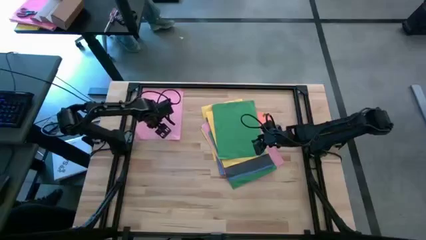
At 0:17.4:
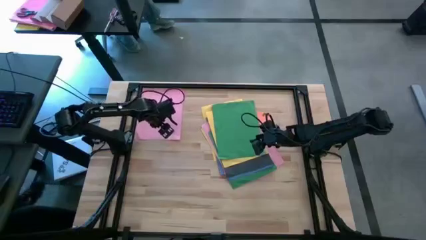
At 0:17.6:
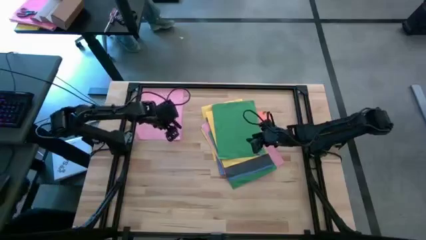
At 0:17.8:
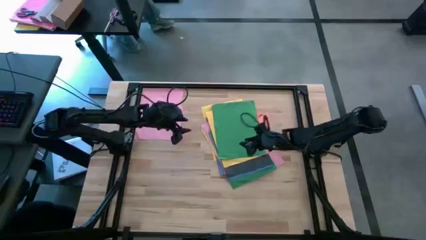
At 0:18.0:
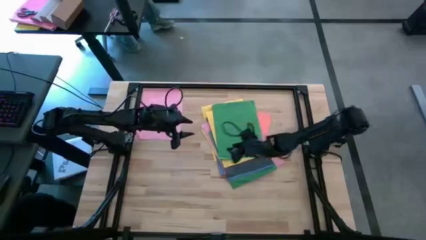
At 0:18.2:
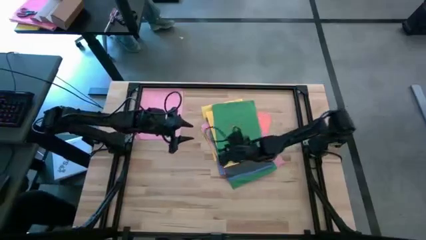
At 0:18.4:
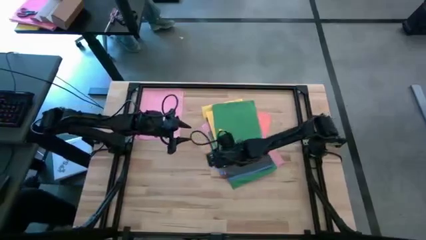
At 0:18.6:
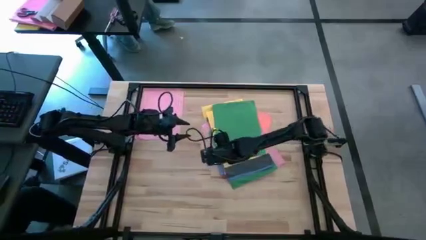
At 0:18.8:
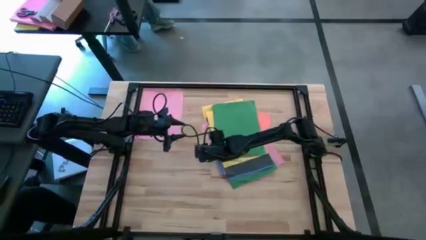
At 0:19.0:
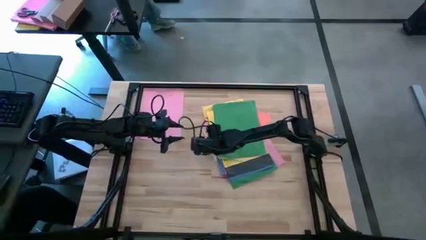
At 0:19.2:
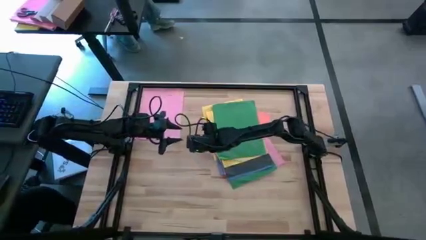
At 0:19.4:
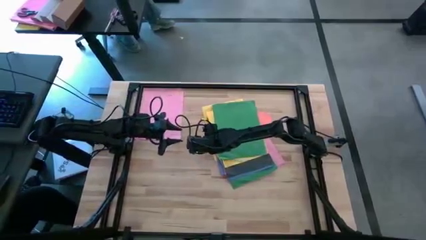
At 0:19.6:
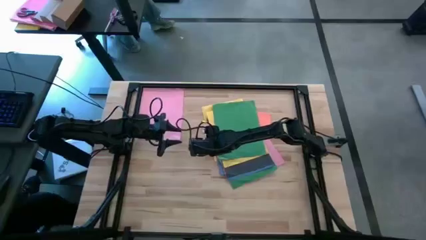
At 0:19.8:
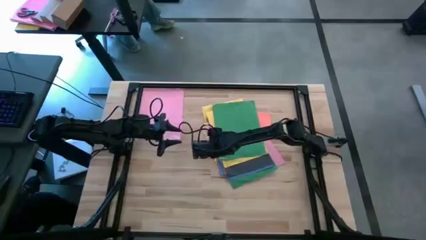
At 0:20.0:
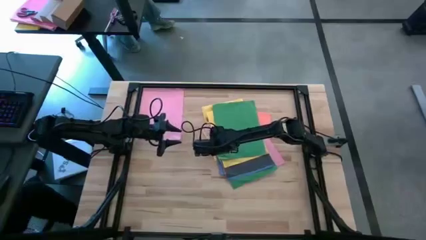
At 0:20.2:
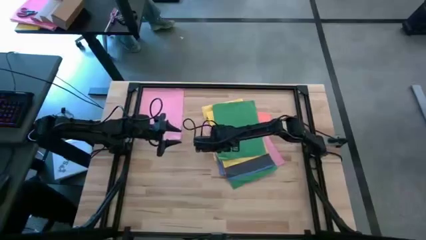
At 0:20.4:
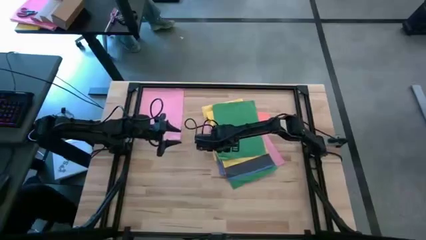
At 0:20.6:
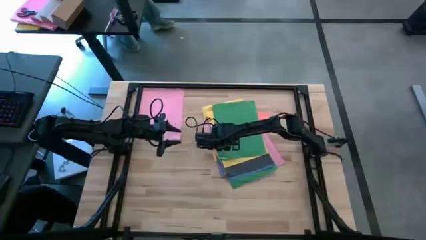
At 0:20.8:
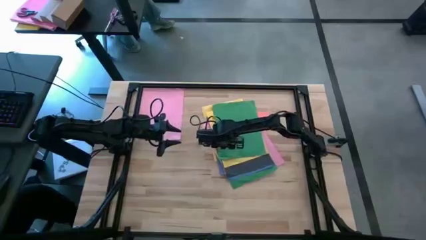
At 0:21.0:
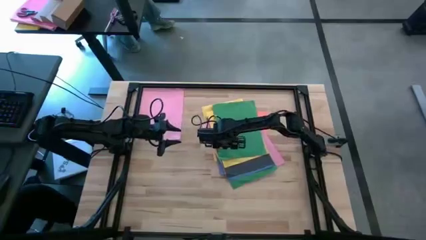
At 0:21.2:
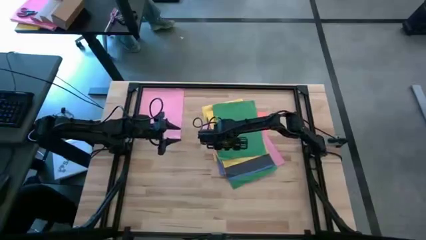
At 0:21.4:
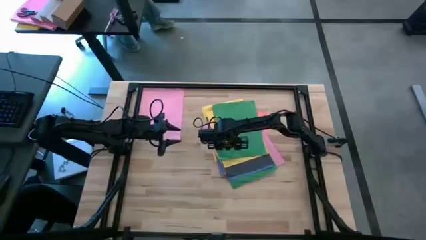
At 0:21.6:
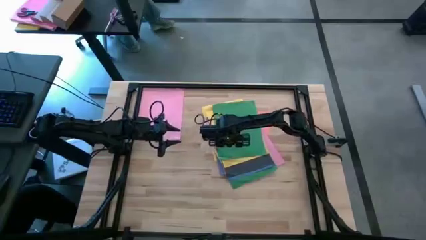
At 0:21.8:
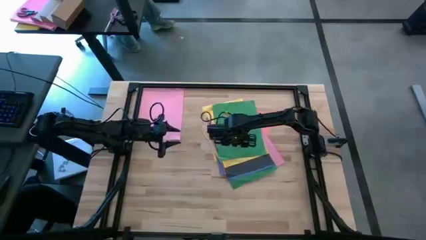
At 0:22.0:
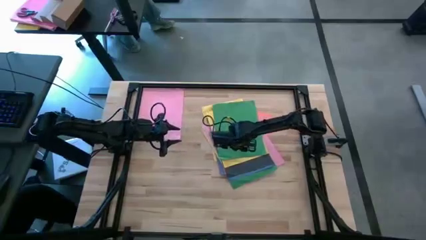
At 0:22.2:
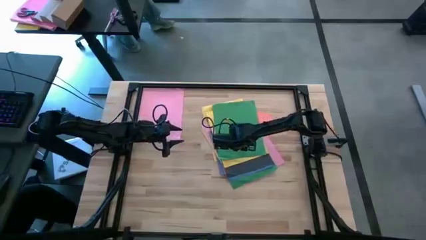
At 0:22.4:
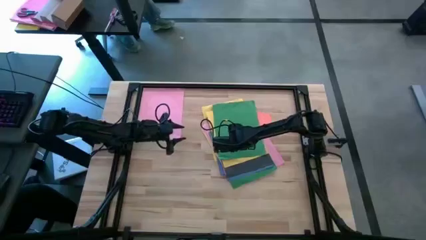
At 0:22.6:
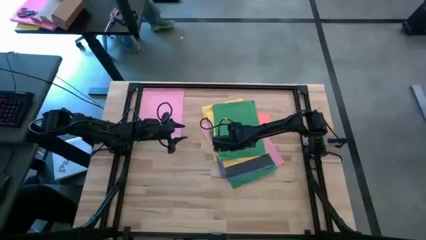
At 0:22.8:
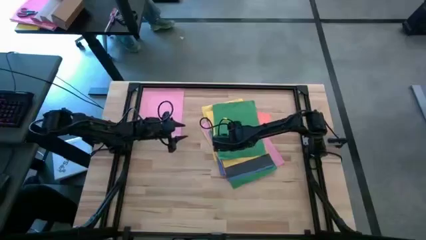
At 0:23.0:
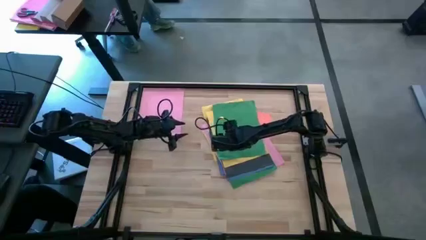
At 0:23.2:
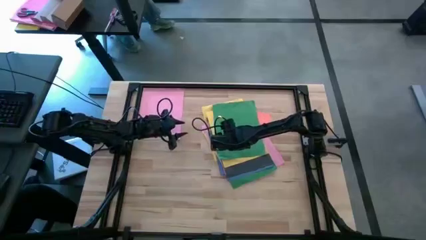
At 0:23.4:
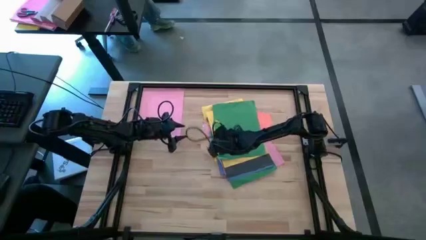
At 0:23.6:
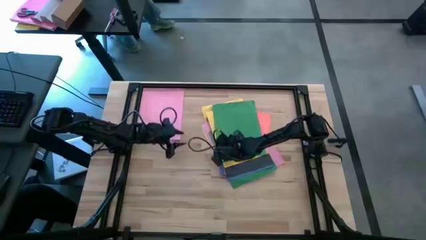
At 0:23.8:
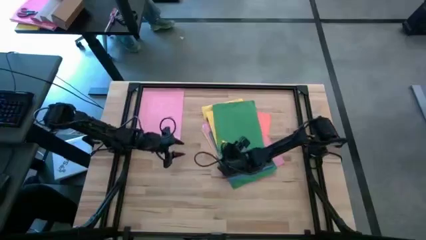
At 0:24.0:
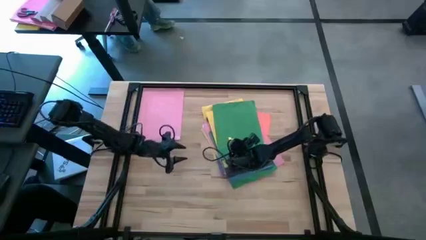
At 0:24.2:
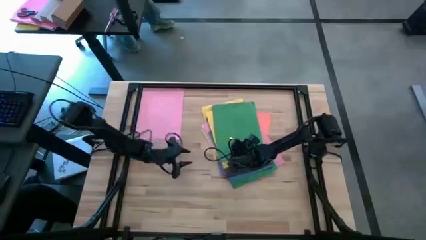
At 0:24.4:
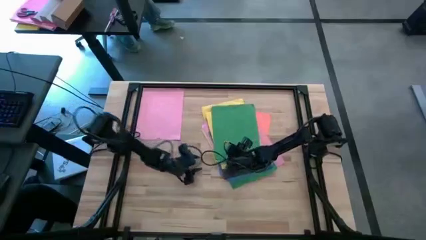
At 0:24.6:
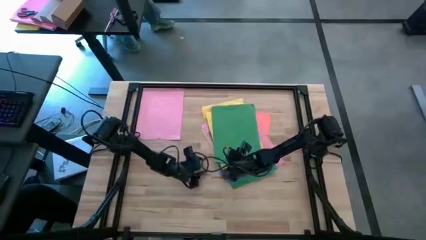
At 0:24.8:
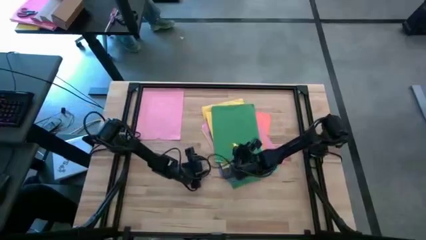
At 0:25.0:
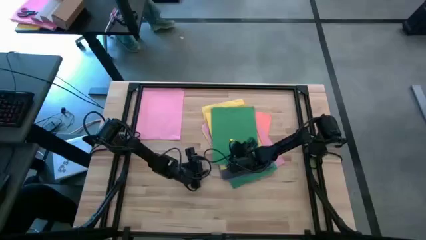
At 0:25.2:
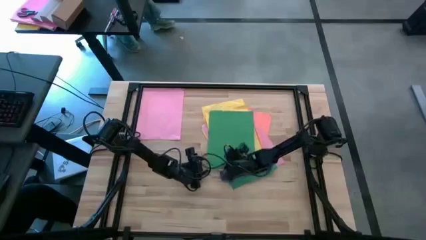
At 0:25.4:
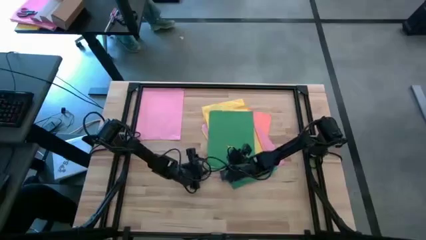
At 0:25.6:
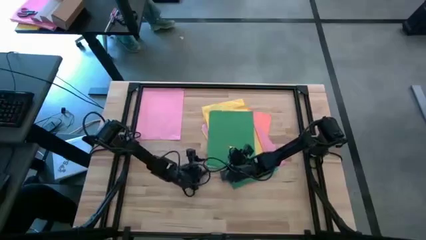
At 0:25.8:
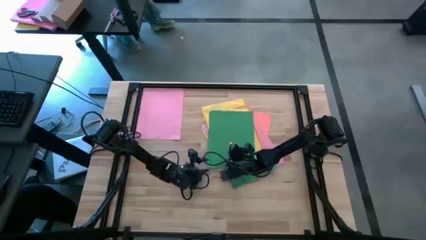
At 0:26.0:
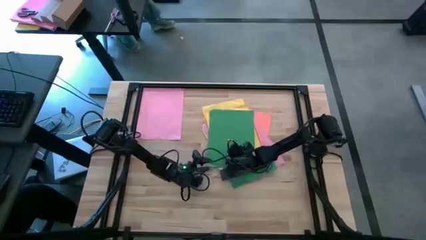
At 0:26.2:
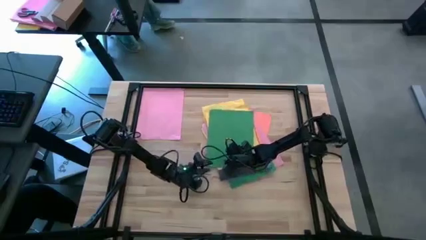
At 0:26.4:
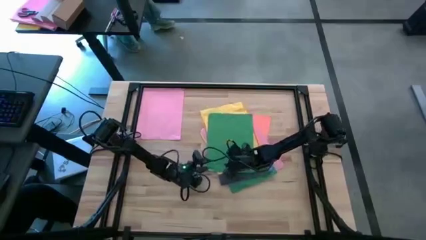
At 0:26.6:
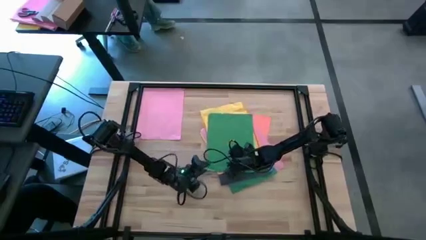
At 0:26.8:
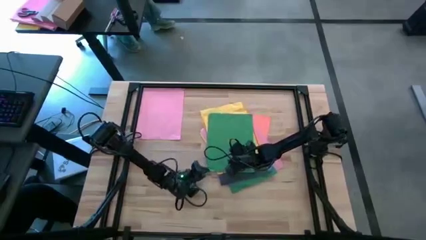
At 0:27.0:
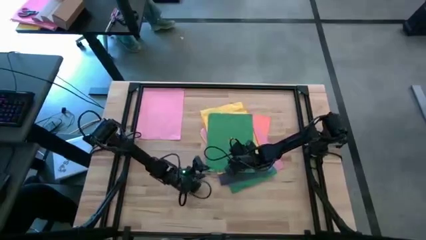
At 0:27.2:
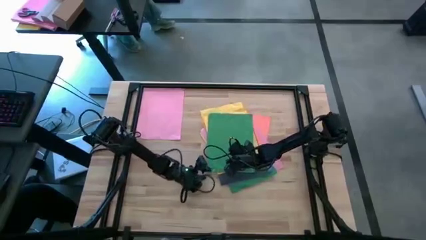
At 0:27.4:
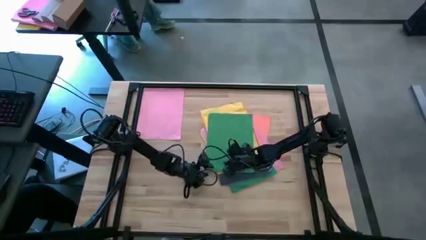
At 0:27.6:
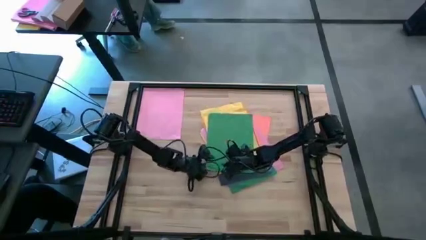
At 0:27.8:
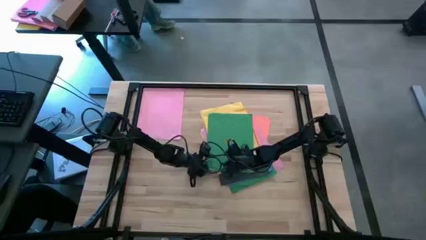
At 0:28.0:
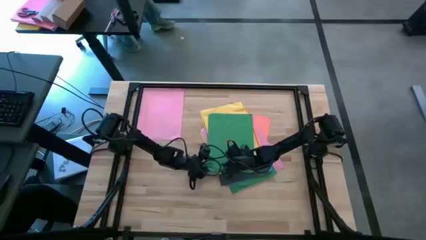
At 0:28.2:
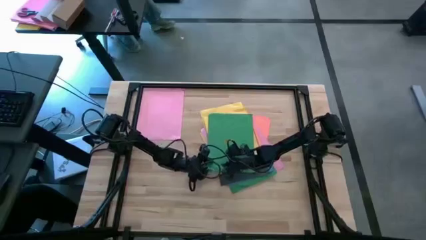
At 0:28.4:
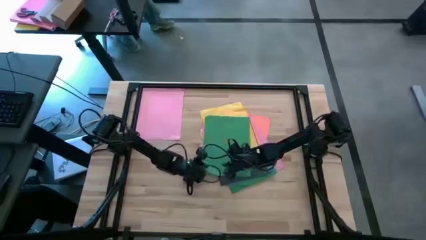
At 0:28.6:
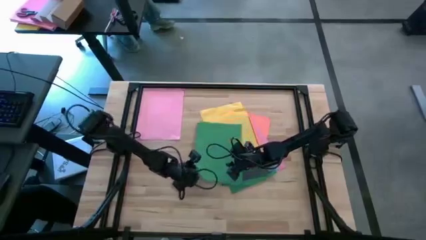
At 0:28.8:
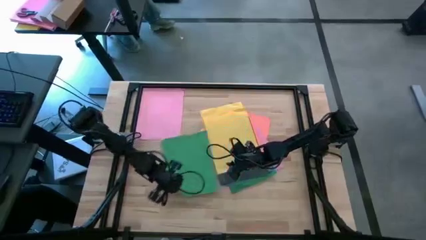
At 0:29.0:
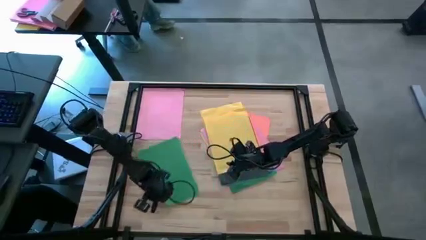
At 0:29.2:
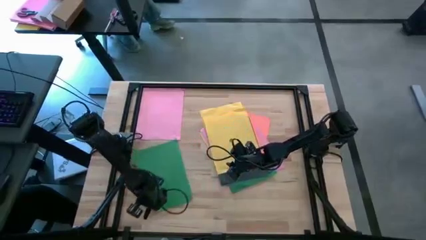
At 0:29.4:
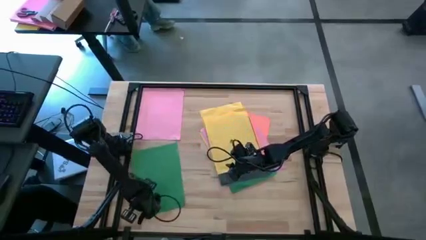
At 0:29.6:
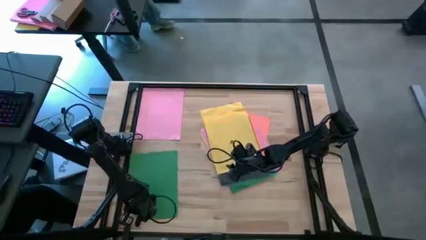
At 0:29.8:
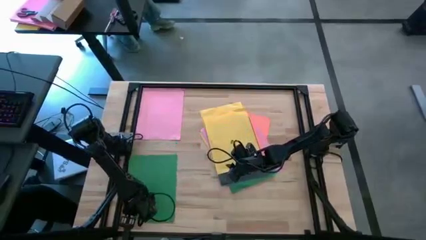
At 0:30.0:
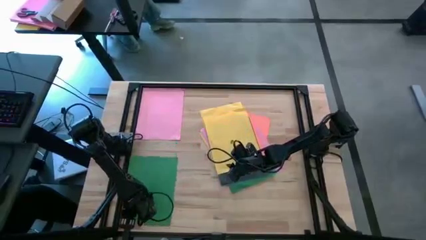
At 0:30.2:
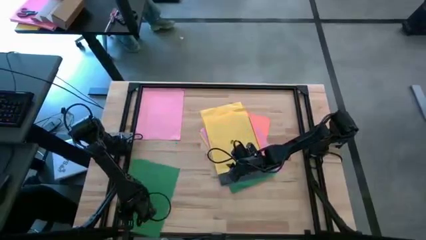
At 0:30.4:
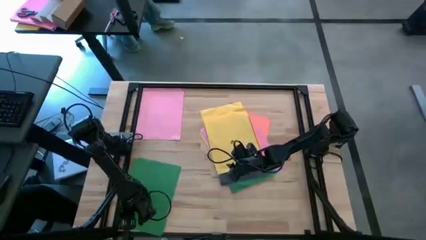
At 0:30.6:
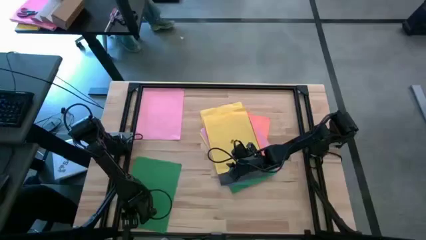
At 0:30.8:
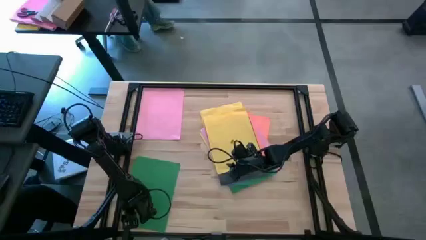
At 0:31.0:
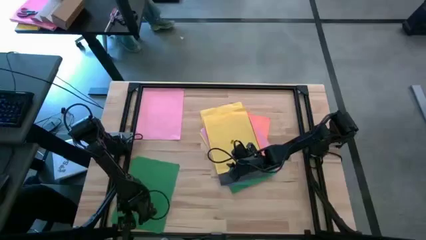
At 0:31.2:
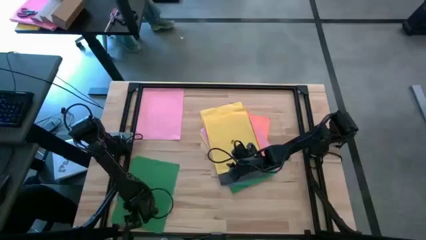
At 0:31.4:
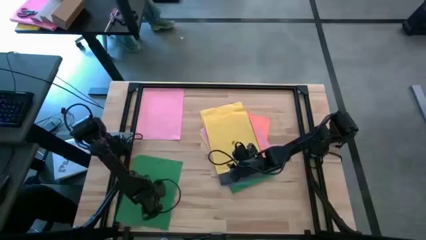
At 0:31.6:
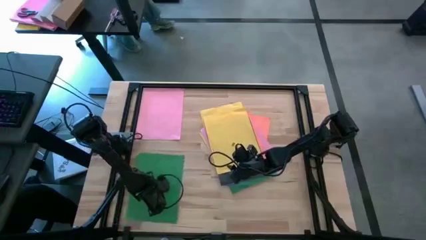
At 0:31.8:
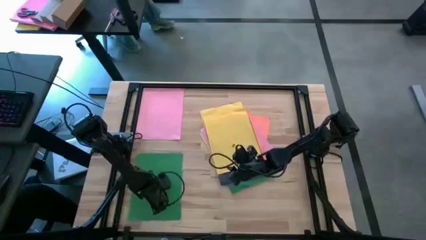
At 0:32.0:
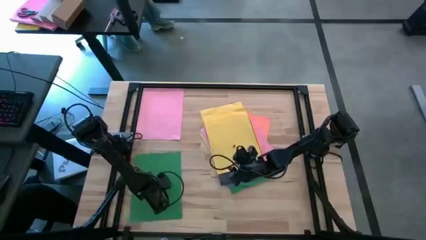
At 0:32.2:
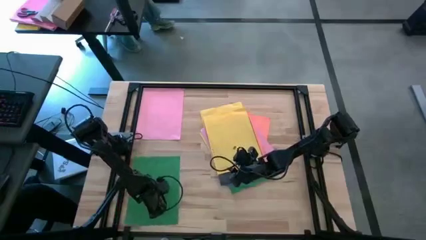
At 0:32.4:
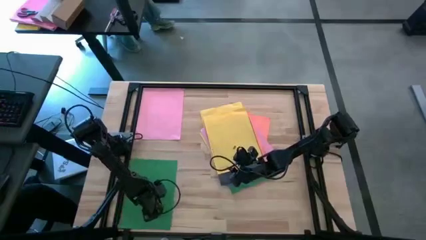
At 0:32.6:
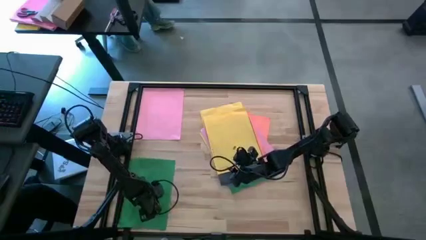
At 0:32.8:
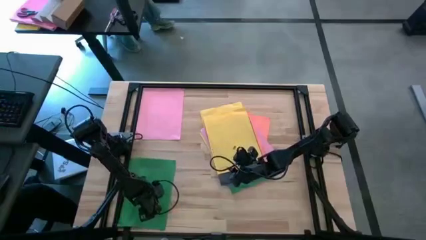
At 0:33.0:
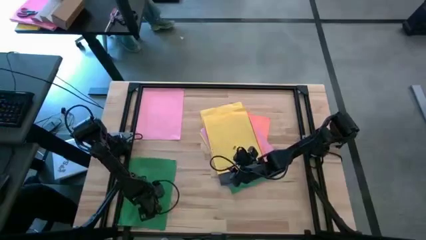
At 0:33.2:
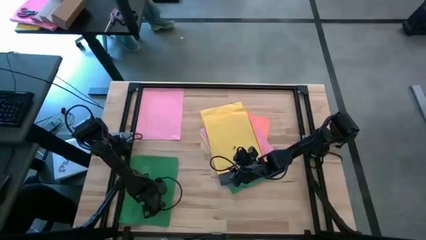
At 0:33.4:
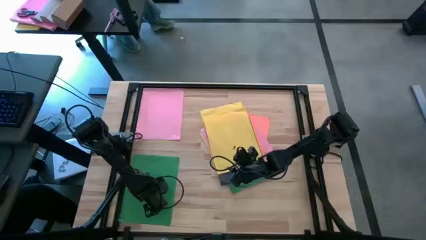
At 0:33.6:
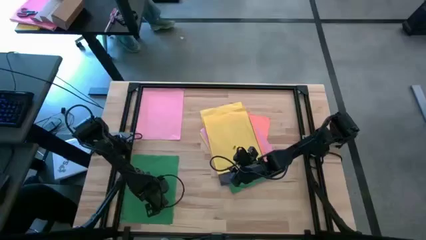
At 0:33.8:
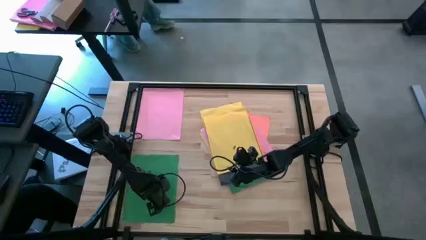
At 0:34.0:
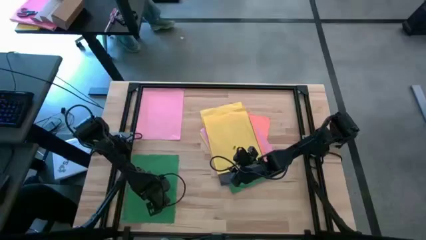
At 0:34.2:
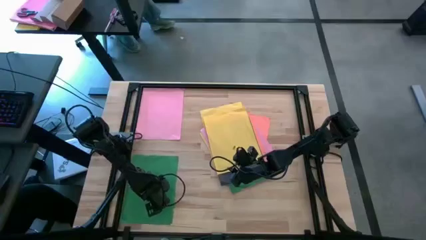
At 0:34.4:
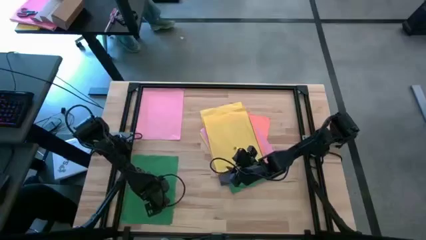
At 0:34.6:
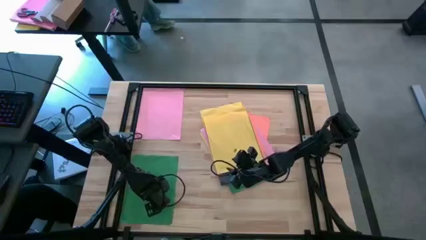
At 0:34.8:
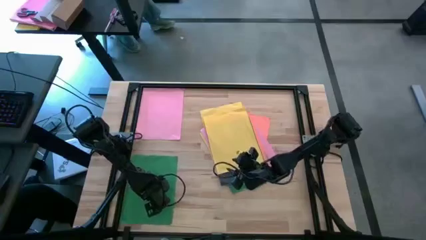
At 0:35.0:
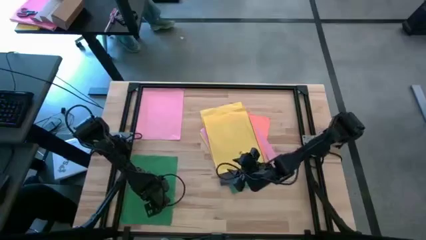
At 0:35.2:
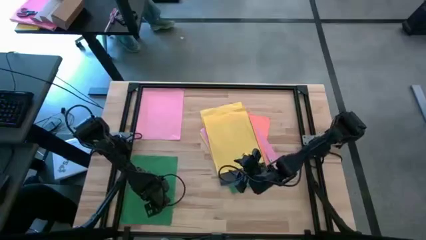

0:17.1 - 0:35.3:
Task: Organize paper
Move the green color paper to the bottom left of the table
